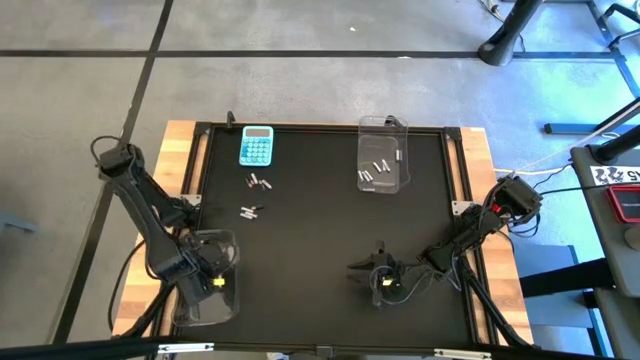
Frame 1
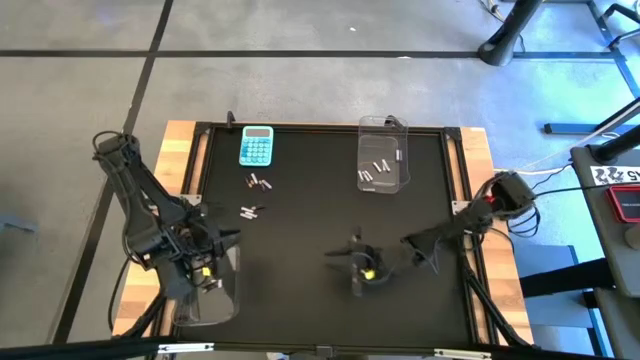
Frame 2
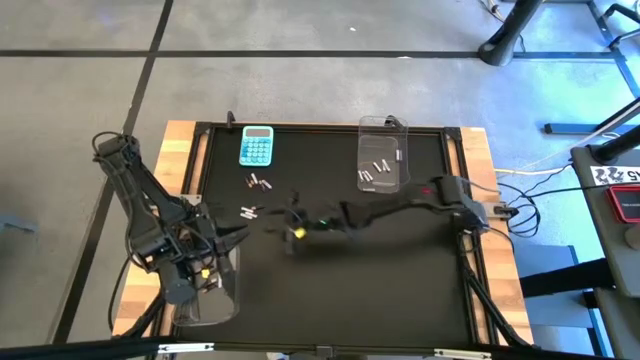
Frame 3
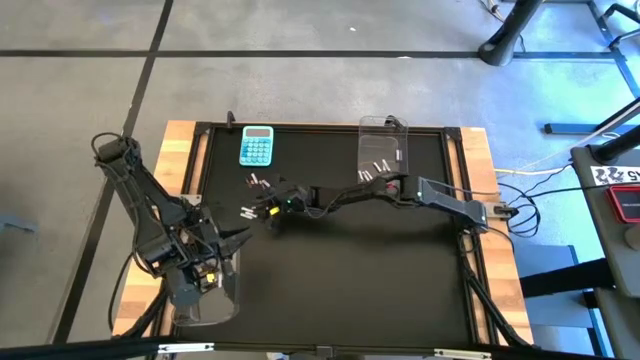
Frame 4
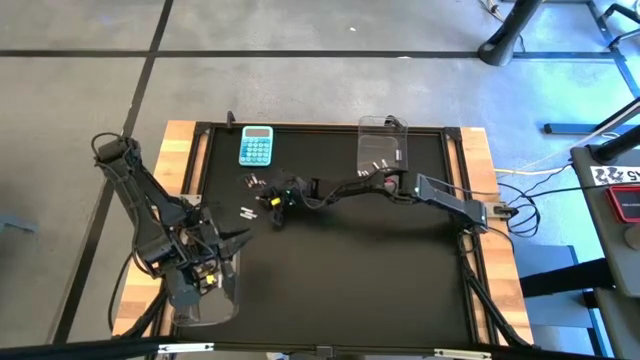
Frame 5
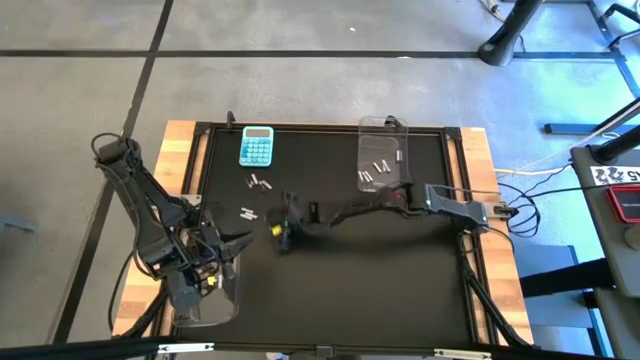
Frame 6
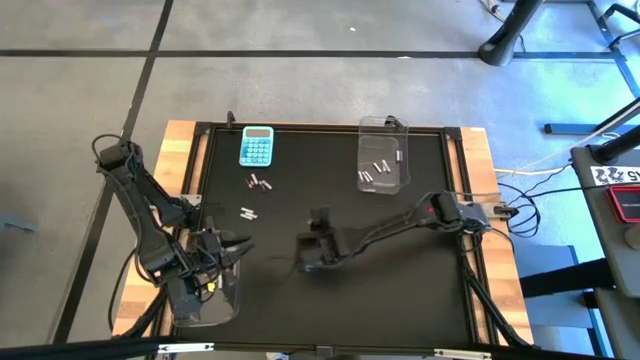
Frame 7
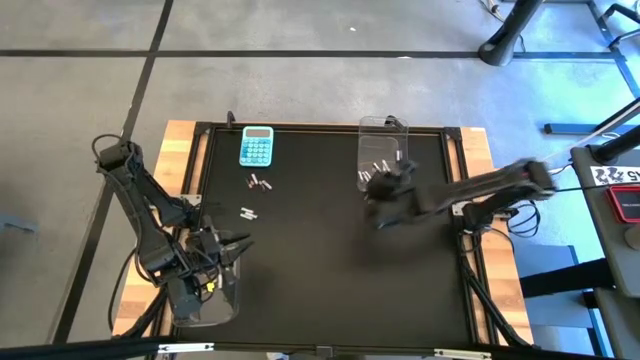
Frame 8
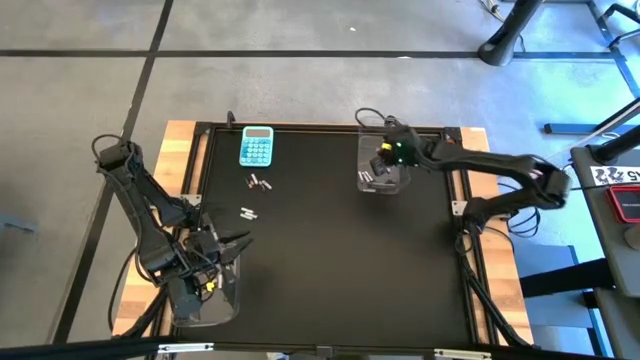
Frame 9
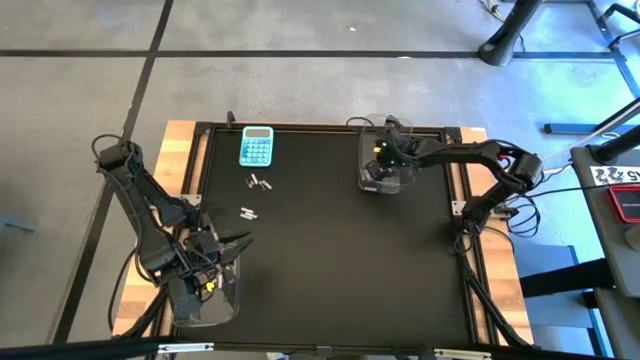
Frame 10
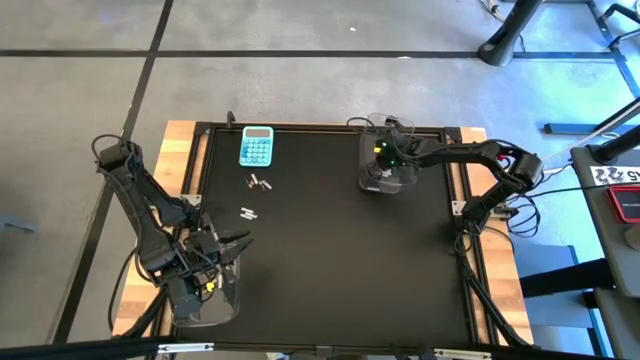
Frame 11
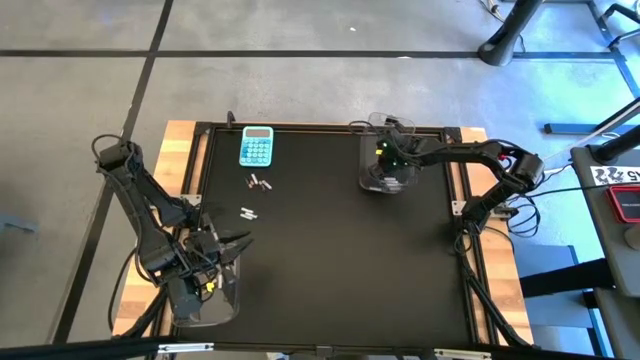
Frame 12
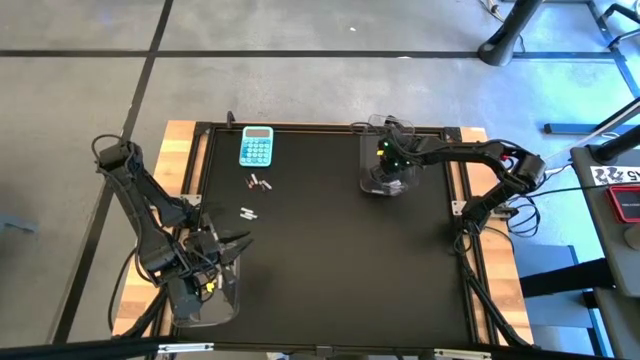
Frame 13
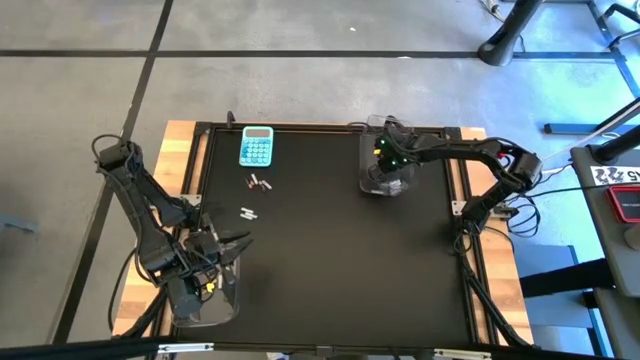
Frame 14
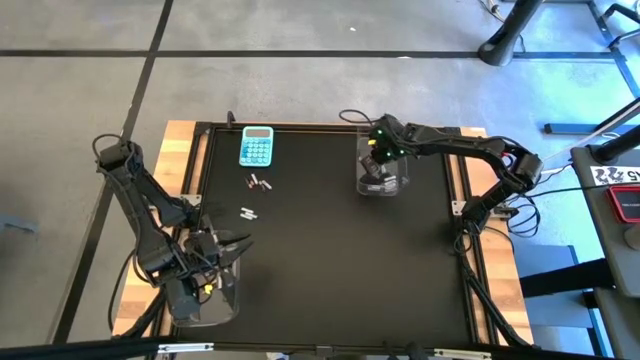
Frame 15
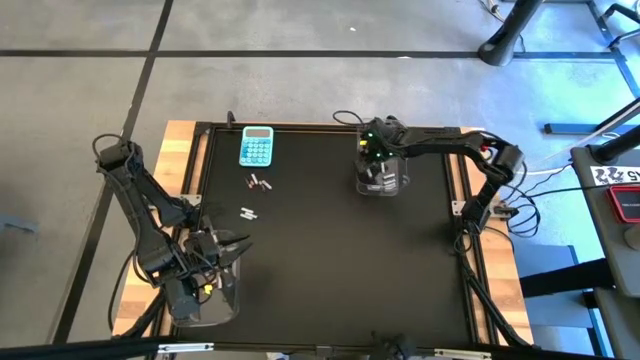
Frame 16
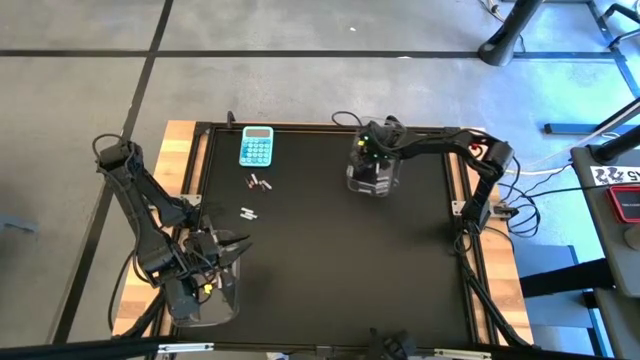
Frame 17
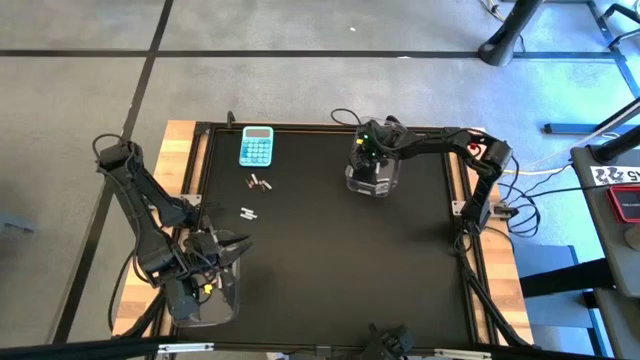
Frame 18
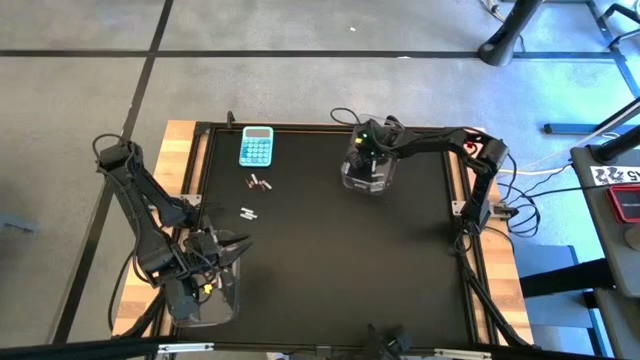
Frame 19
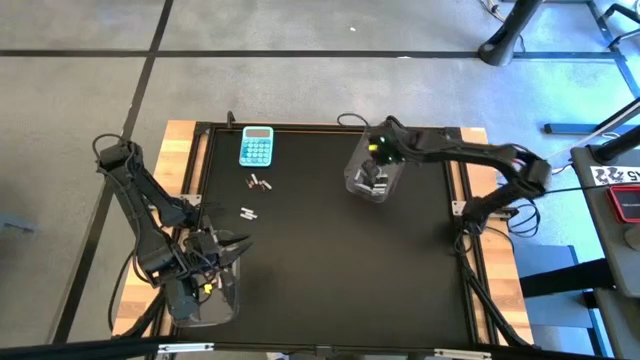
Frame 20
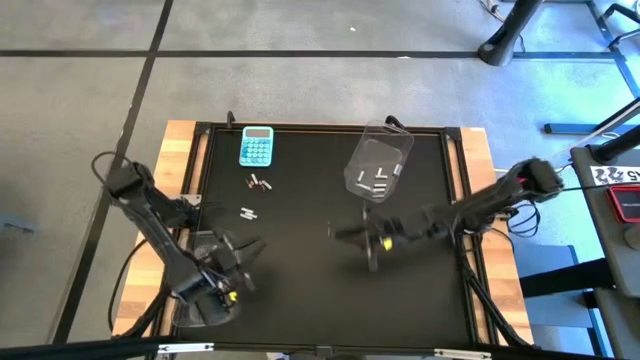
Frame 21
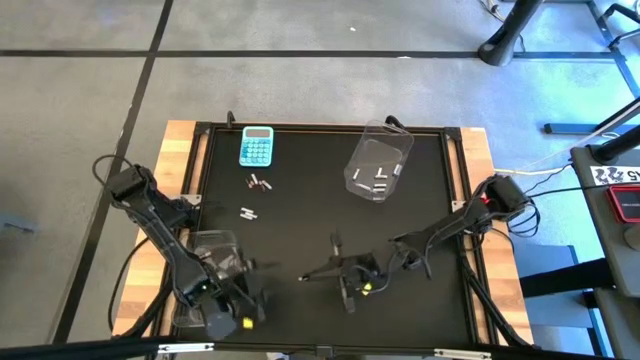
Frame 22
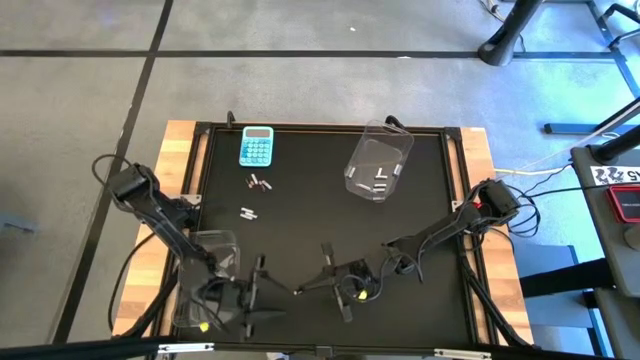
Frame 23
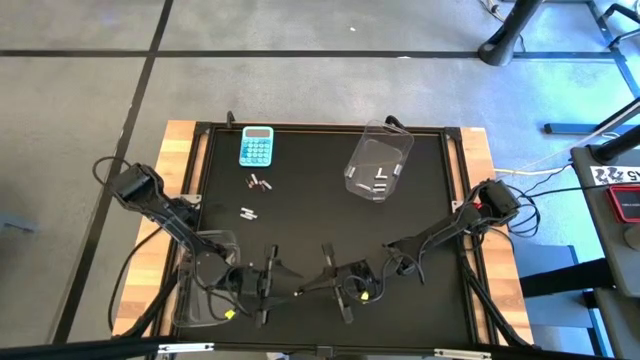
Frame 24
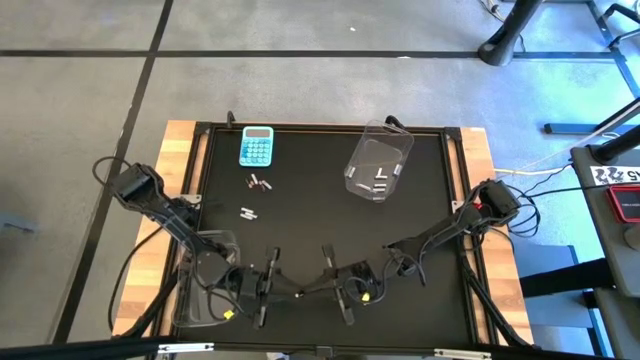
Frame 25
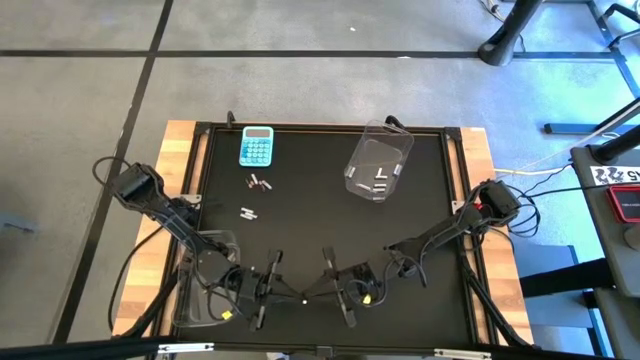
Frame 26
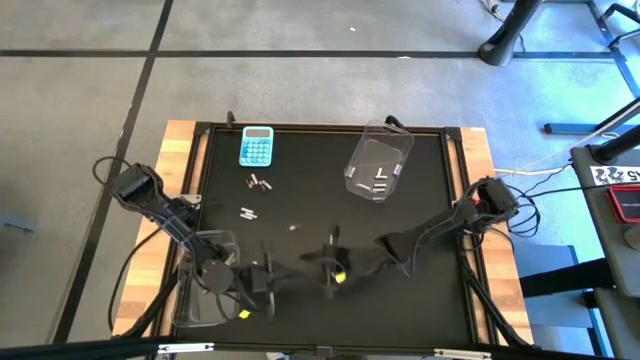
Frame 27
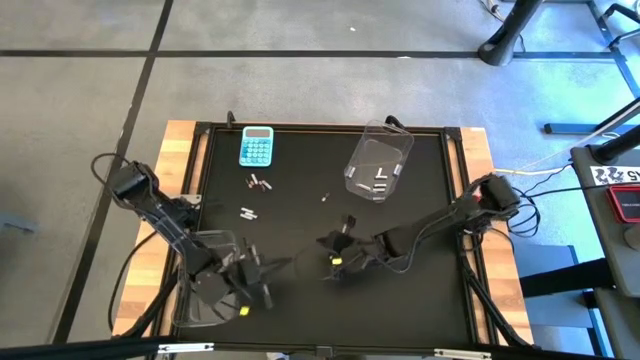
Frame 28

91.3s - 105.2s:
Task: Sort batteries
Put the black battery into the bottom transparent bin

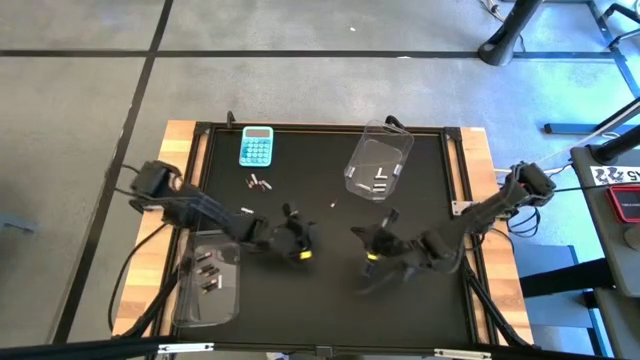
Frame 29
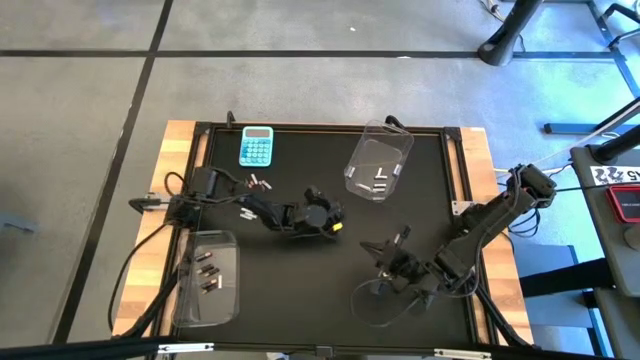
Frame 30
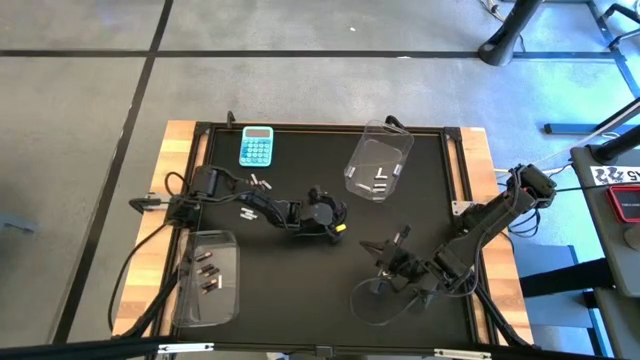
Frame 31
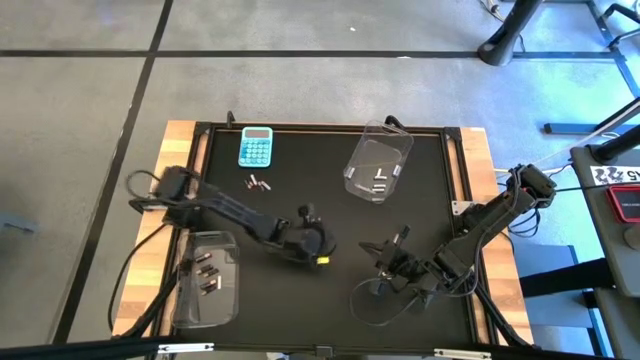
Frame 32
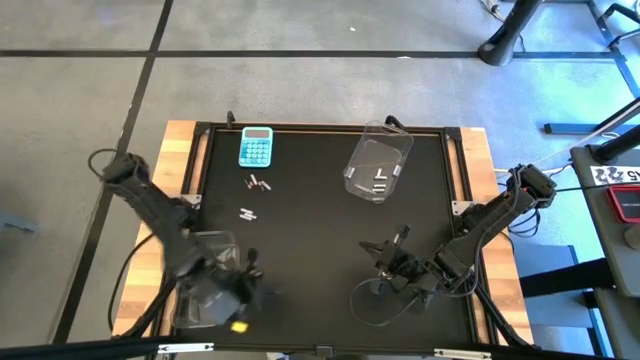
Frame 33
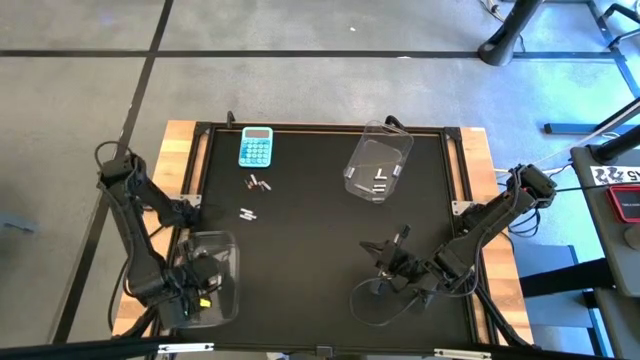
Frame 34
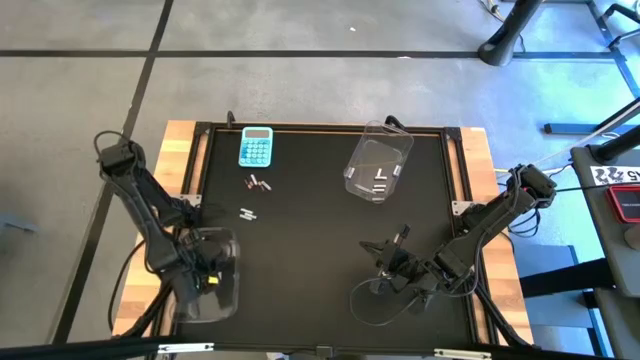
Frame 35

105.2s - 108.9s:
Put the black battery into the bottom transparent bin

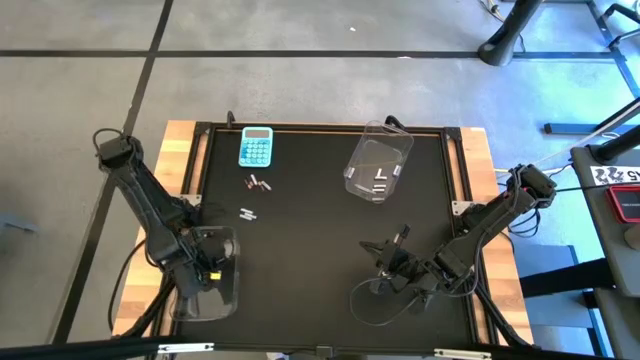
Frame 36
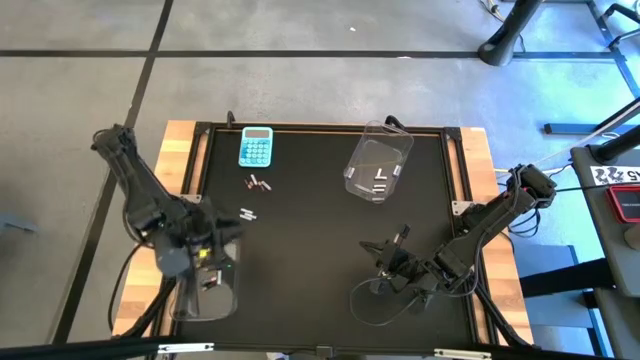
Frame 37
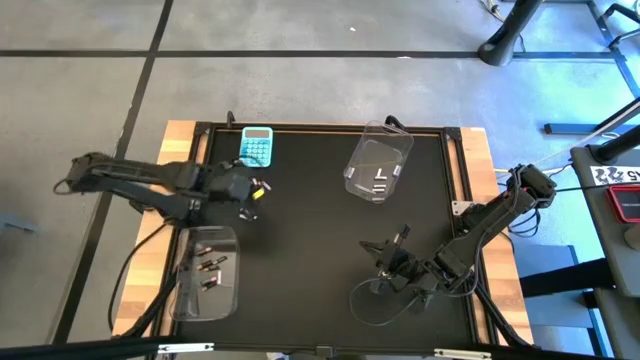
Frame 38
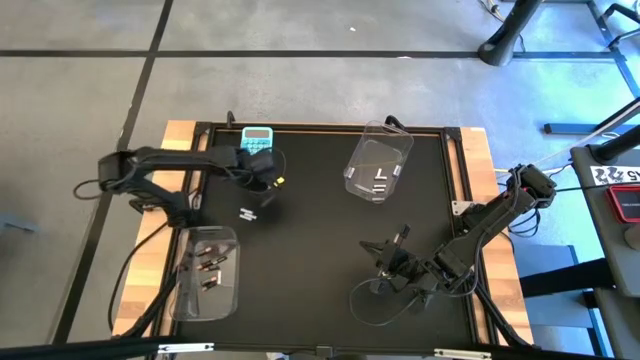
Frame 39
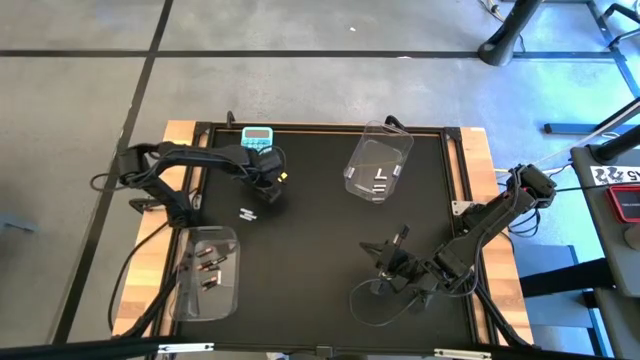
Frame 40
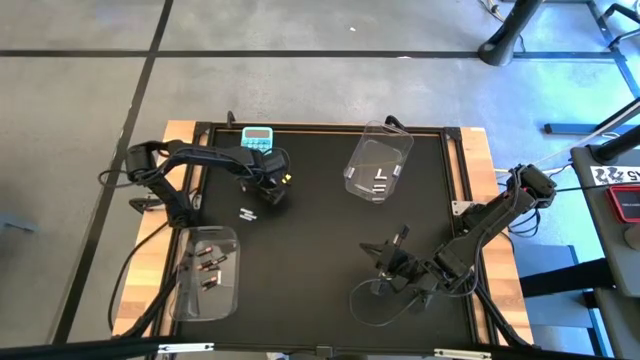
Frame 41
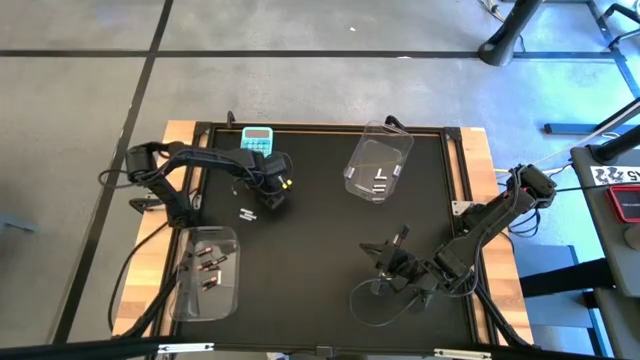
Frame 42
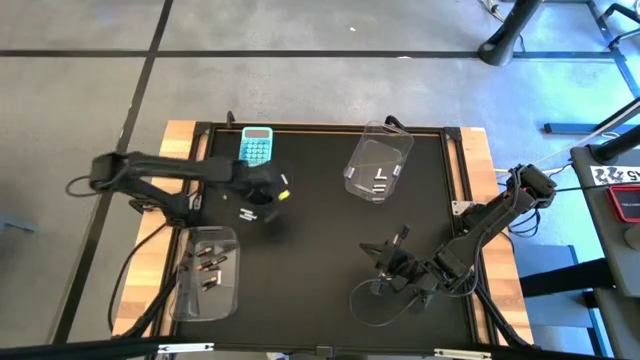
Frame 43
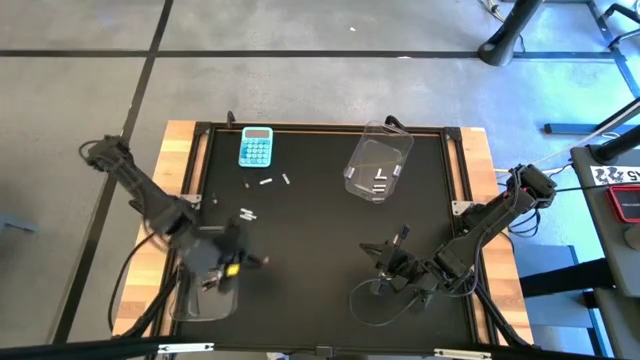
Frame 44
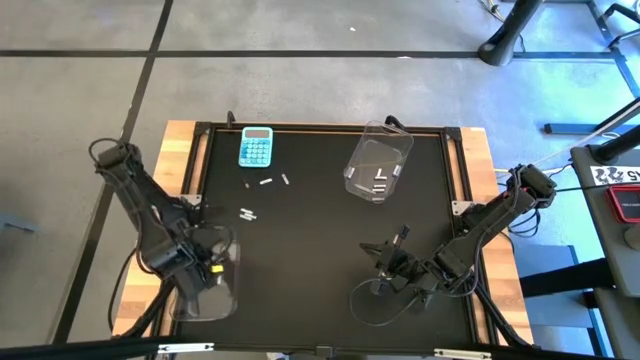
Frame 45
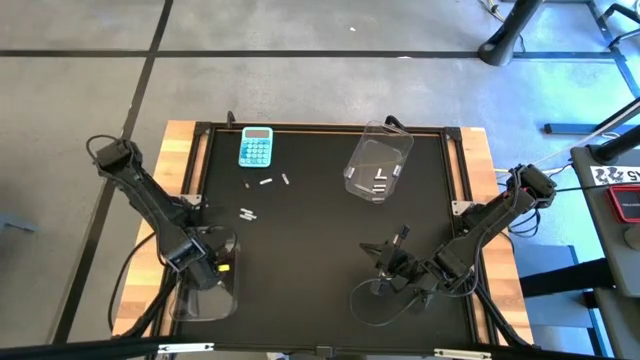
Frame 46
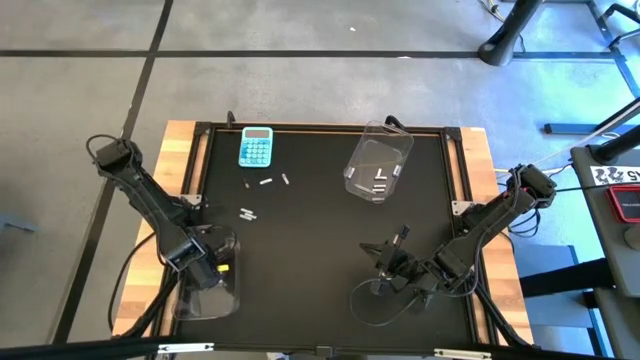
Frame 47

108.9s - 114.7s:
Put the black battery into the bottom transparent bin
